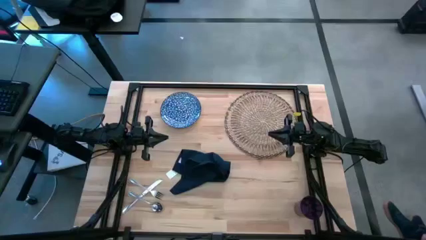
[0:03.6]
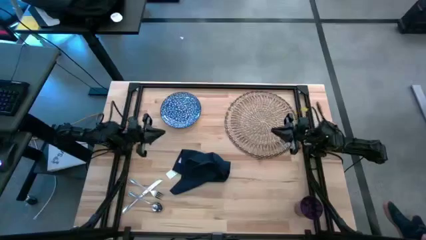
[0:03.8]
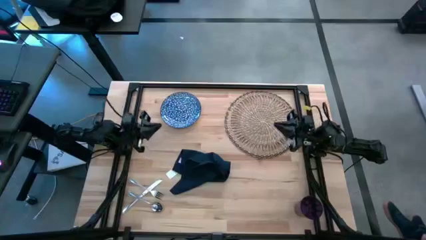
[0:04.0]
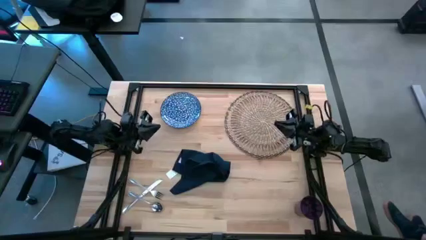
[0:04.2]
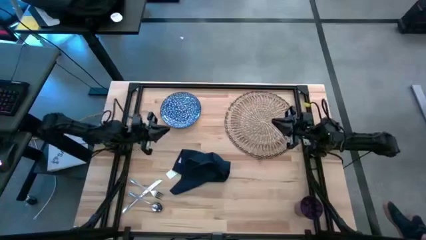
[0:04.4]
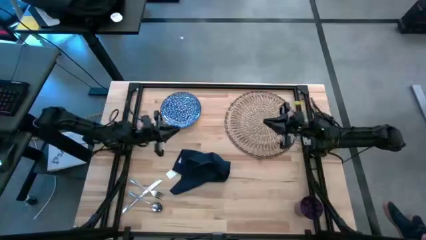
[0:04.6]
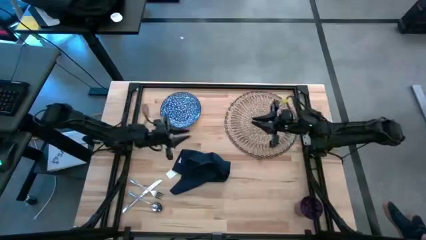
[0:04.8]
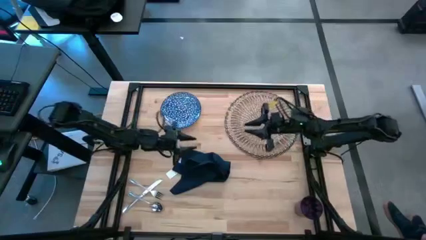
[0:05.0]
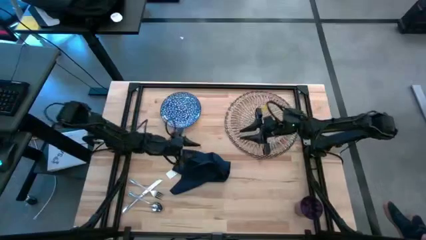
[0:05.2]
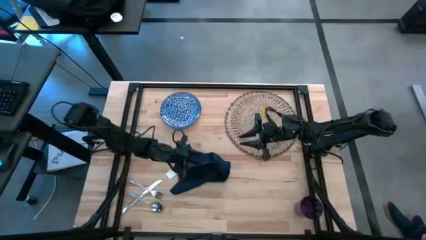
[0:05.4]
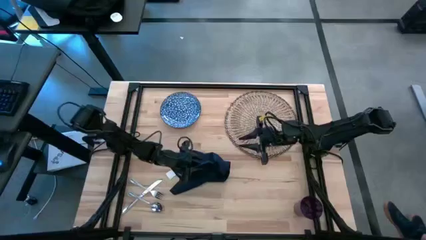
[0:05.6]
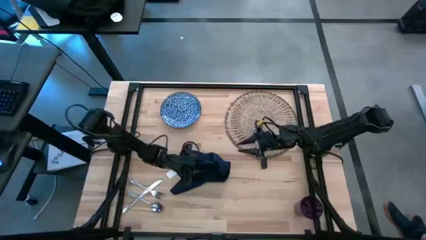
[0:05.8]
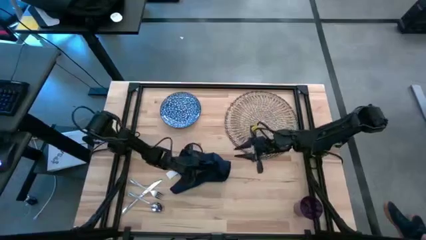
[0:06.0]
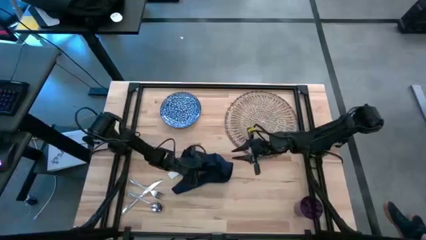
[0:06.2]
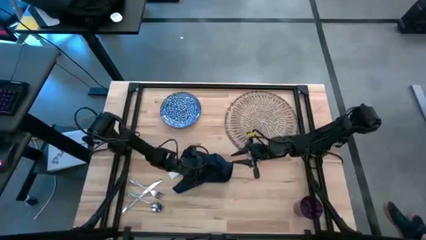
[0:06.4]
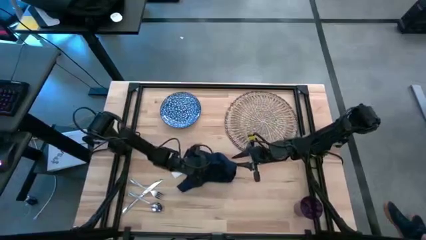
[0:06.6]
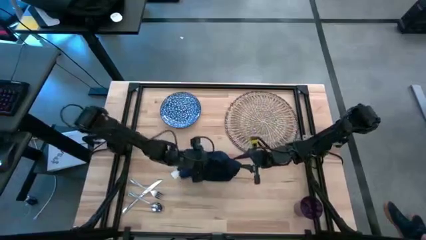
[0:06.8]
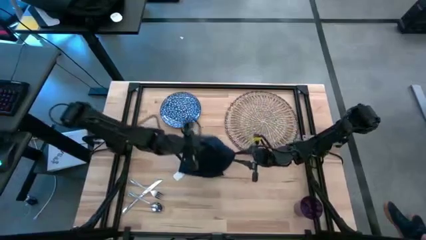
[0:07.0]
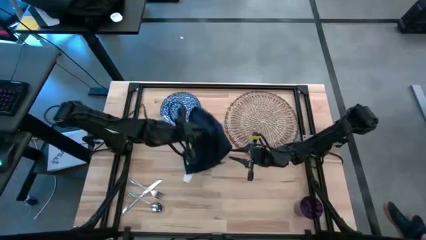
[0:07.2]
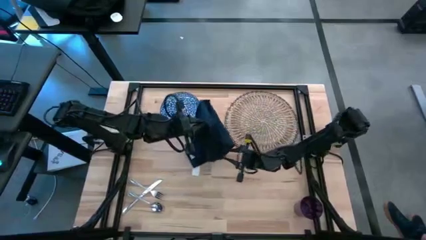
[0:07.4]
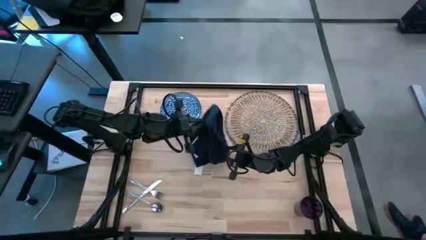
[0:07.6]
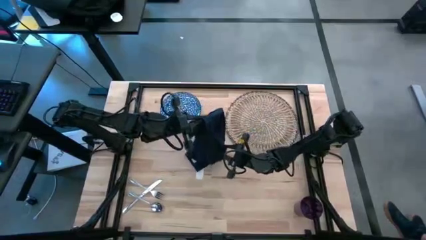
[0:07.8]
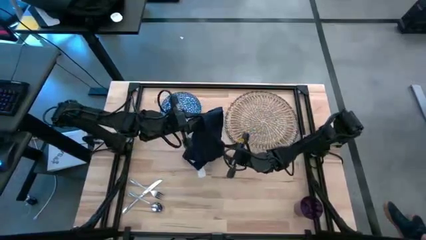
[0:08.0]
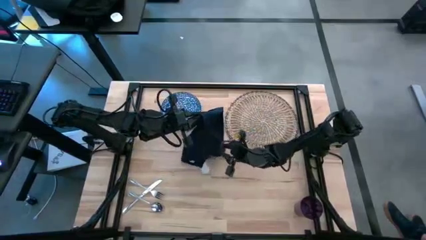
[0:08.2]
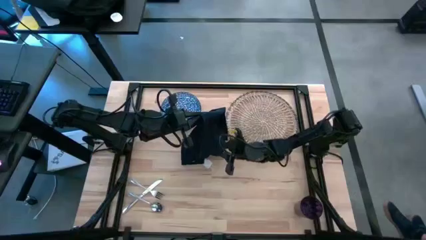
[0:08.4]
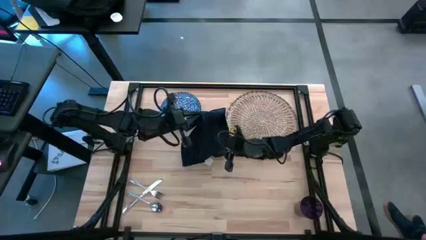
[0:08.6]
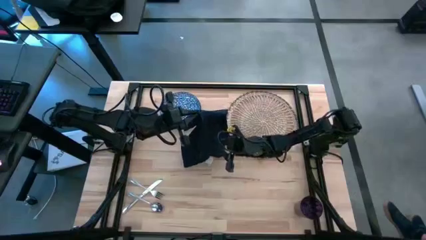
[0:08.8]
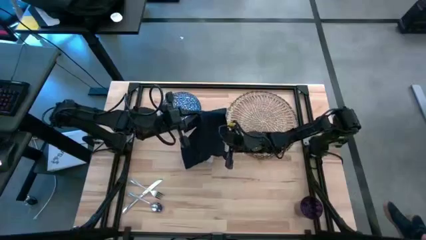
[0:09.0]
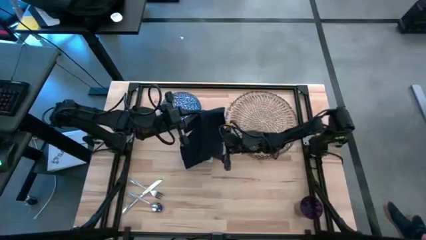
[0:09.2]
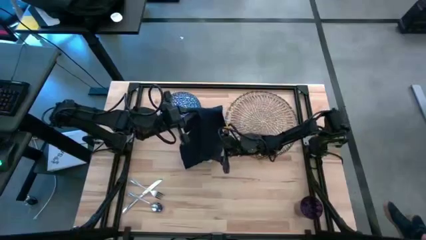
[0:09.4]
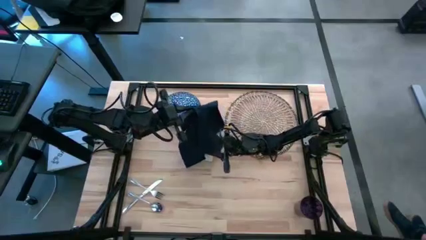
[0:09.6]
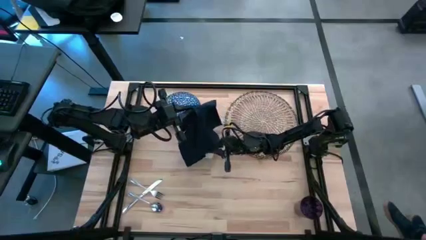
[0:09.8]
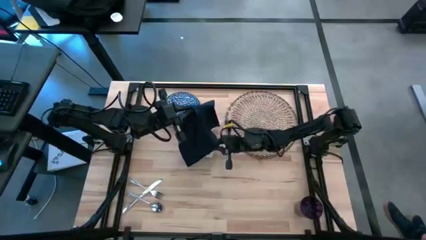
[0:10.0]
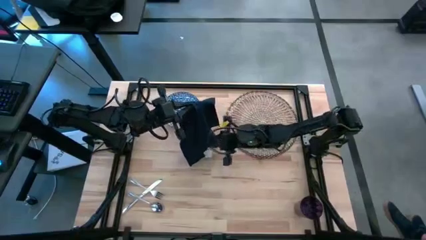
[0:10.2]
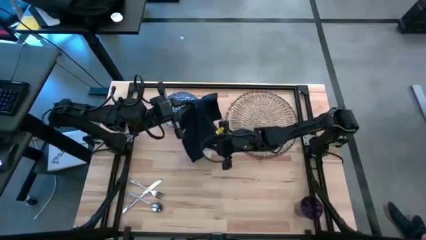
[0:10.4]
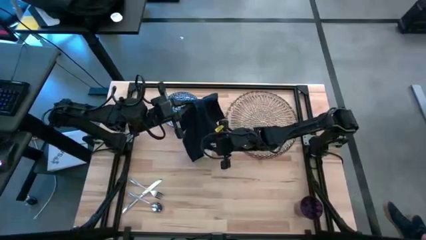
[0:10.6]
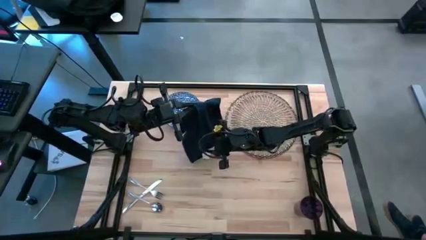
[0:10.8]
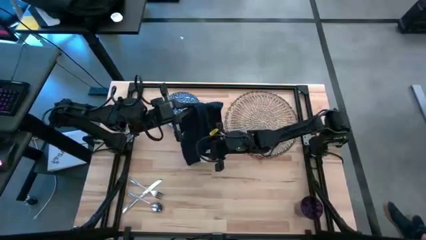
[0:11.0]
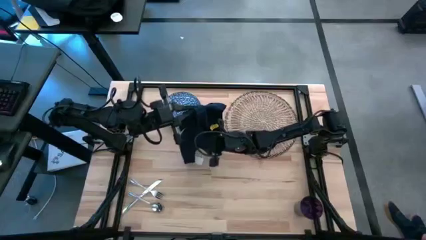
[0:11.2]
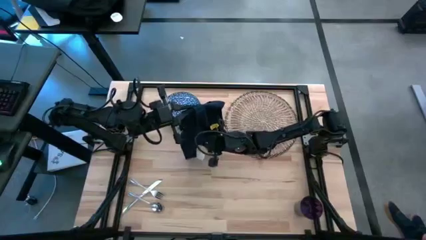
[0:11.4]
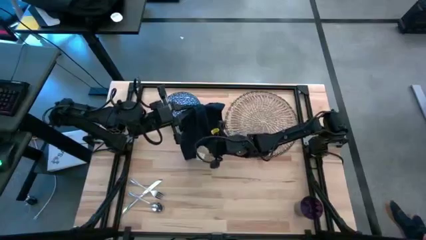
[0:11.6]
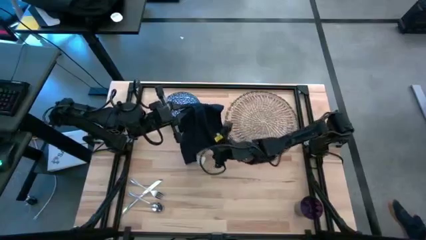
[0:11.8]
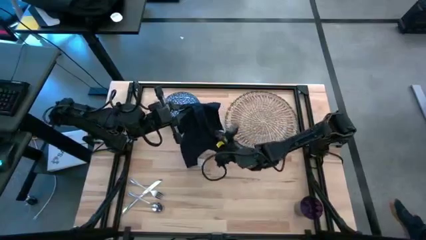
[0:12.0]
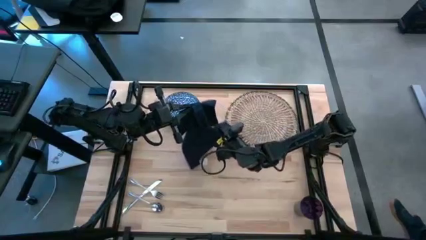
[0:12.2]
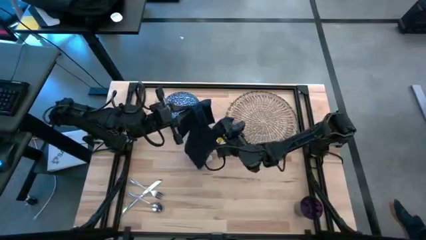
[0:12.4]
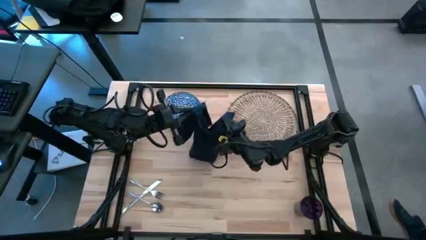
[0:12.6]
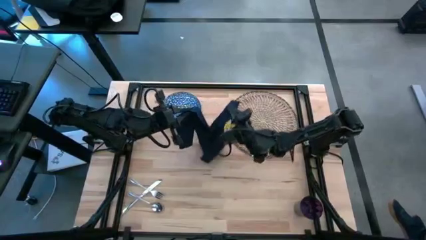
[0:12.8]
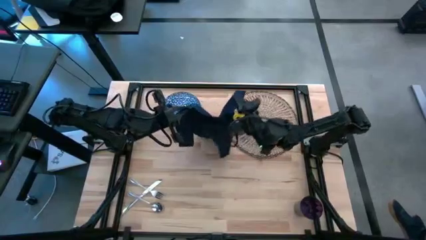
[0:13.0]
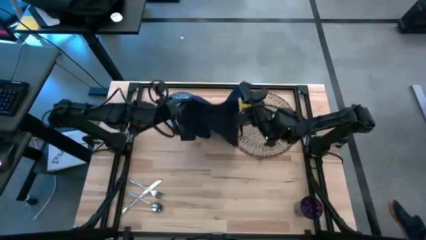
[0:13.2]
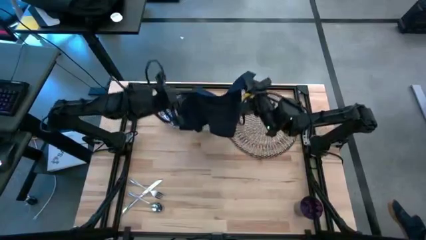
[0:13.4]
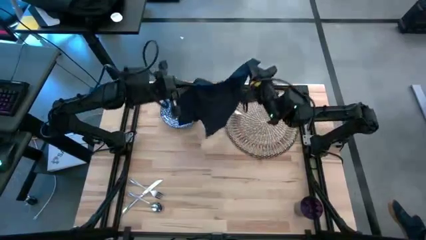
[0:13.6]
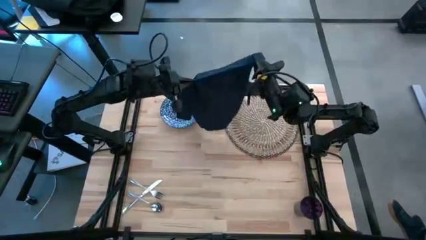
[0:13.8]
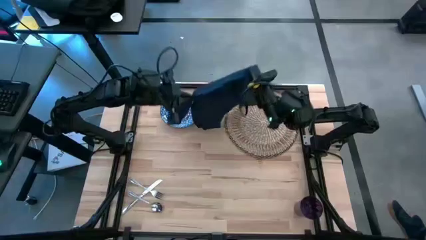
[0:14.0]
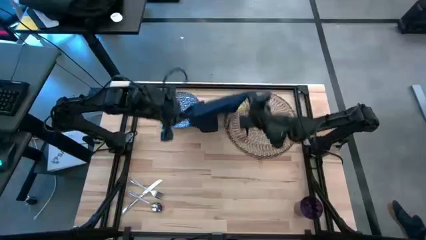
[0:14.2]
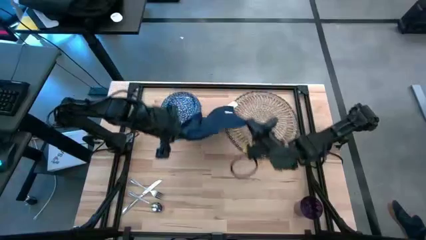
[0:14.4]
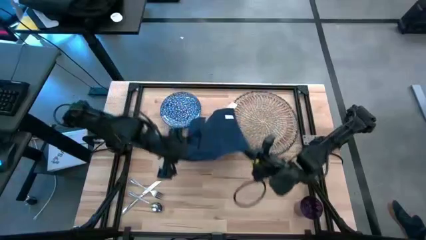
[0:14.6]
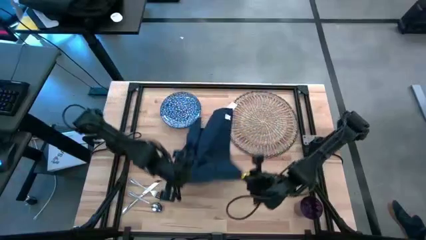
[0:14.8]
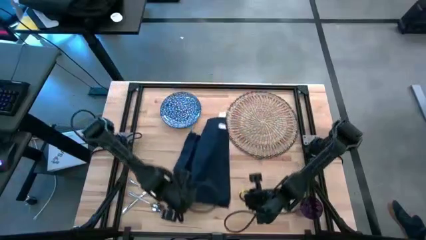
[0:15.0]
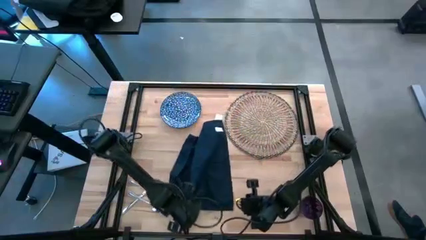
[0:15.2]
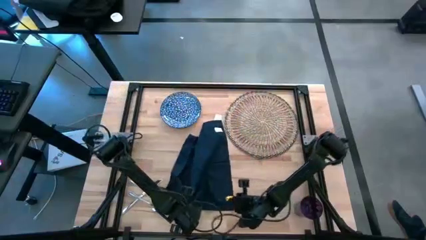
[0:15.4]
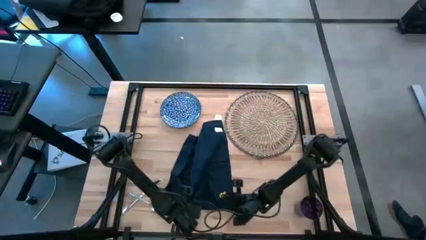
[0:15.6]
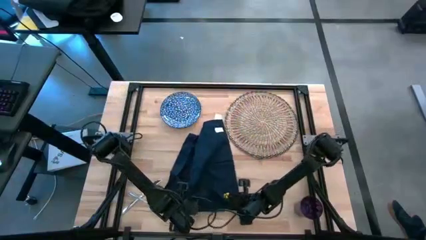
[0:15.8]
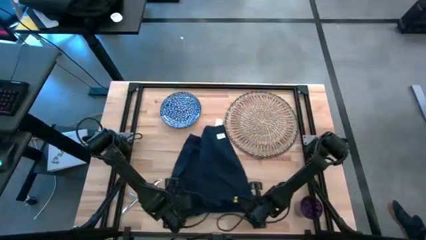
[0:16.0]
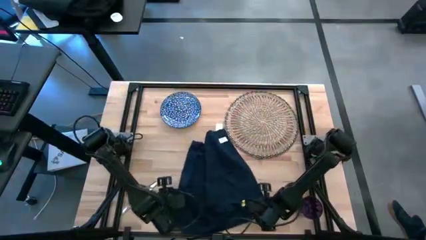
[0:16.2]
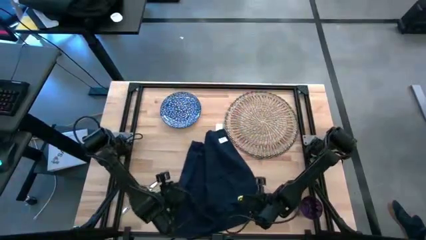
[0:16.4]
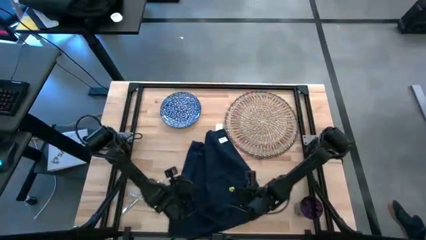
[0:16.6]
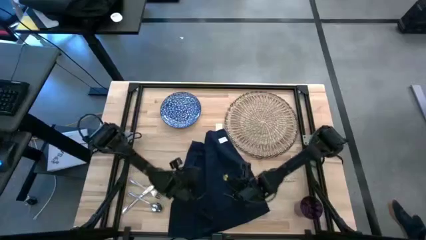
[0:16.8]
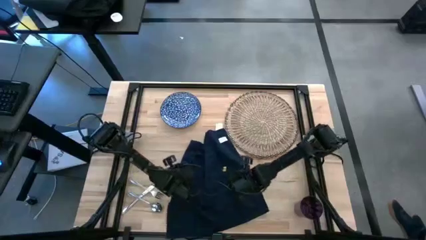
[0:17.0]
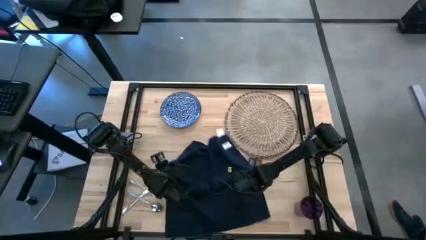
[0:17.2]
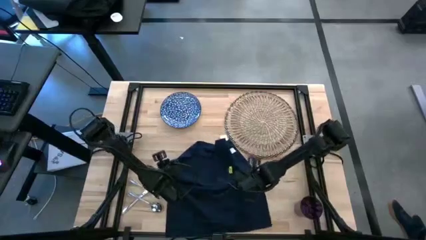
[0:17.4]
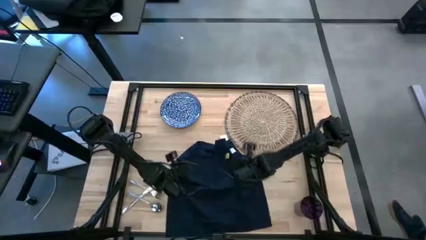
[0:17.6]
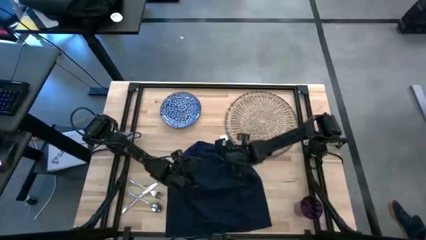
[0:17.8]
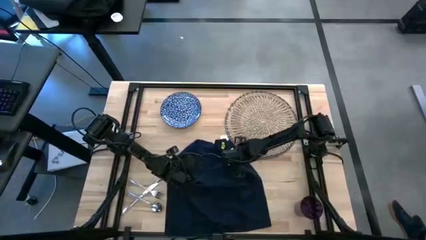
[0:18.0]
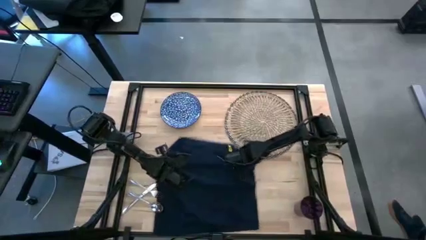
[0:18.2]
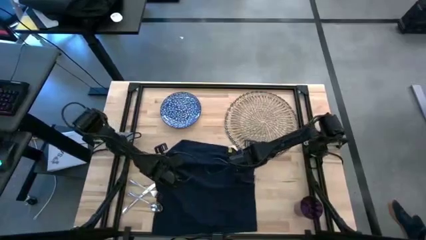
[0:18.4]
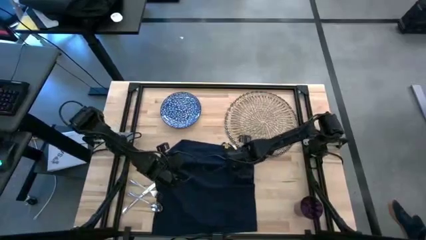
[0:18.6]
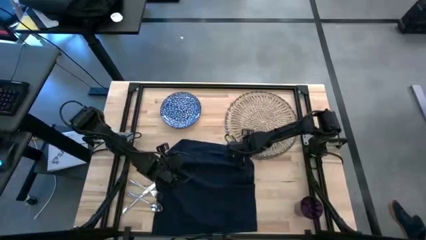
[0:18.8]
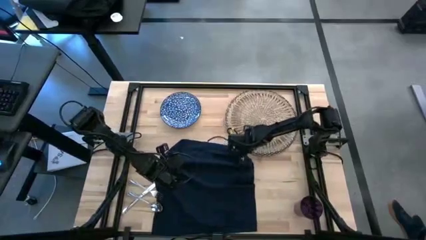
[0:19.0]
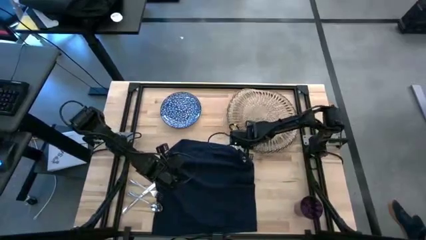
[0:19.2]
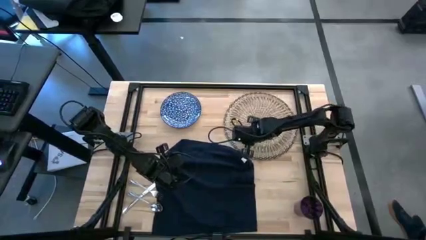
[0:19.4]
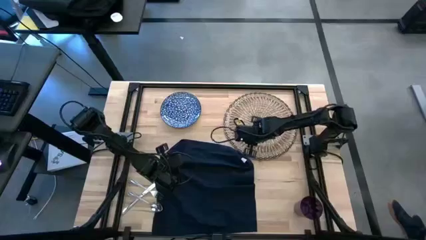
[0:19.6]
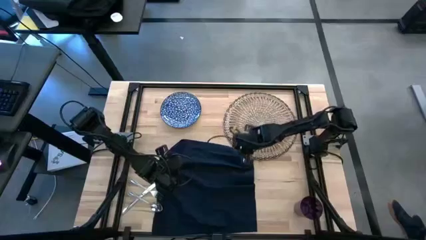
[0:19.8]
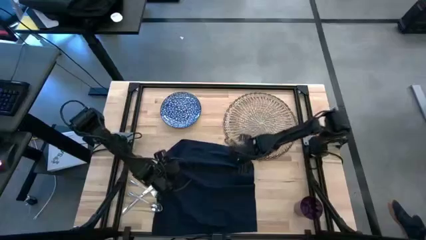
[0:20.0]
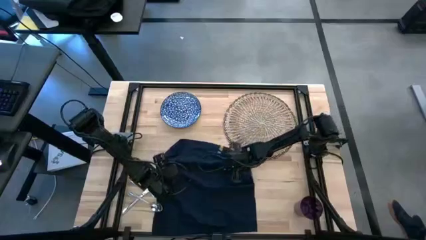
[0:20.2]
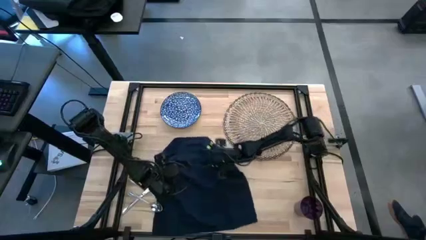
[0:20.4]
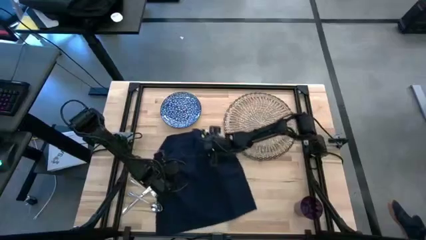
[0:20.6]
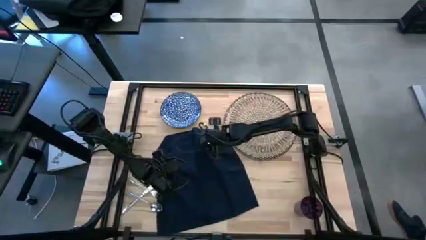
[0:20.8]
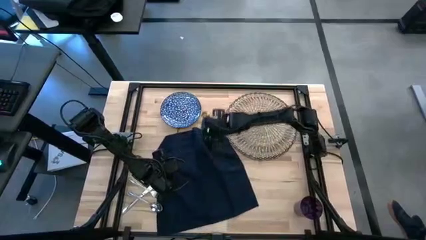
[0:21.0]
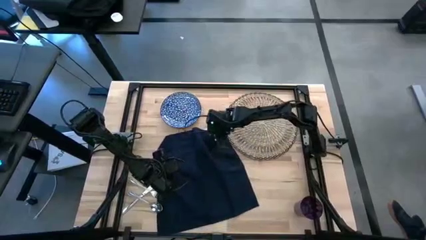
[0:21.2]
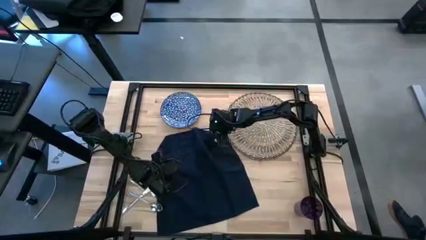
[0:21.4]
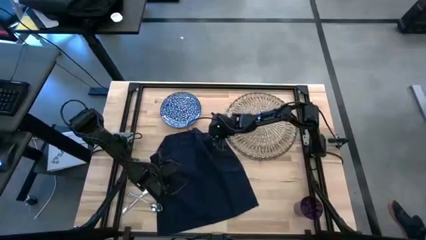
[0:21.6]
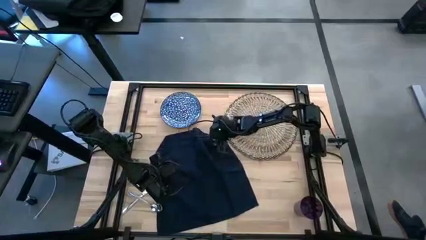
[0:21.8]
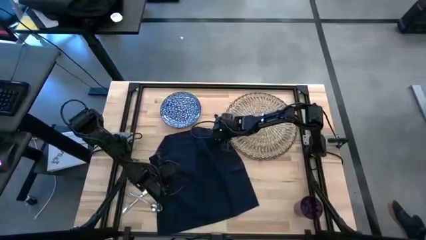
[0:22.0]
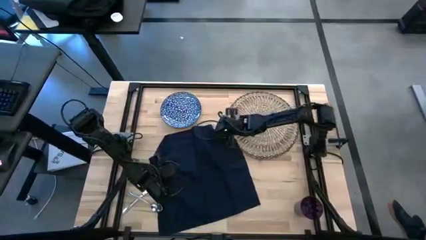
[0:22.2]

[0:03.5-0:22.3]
Task: Set table place
Fold the blue table napkin
